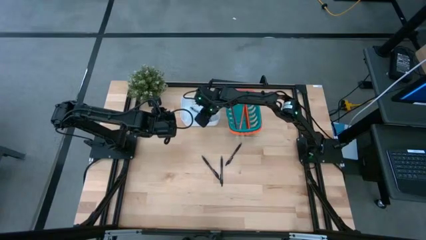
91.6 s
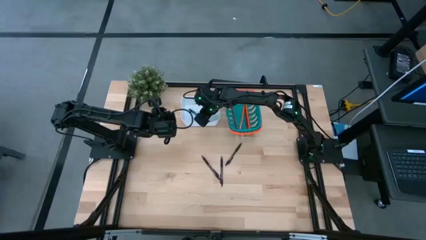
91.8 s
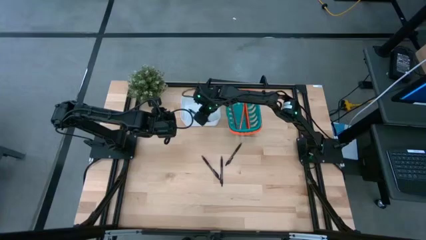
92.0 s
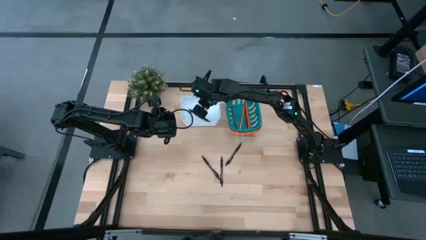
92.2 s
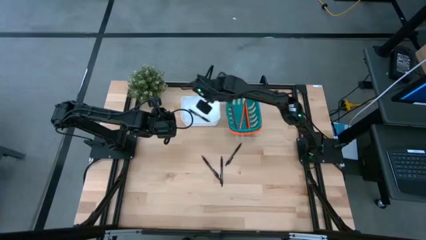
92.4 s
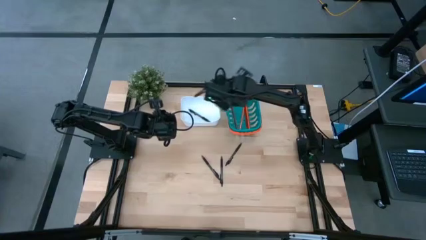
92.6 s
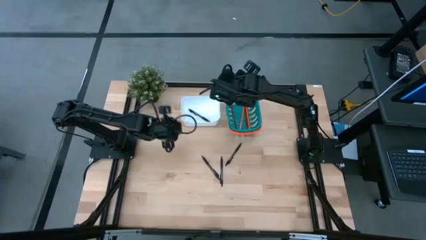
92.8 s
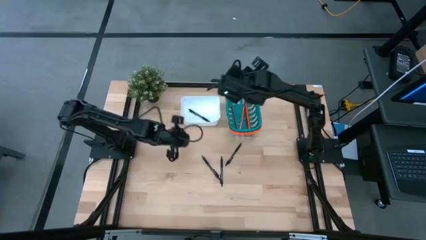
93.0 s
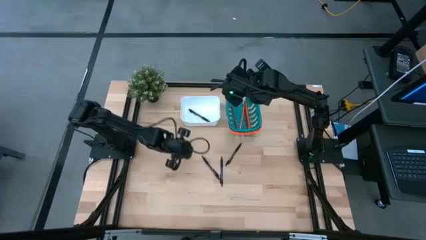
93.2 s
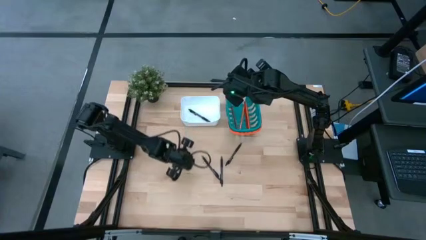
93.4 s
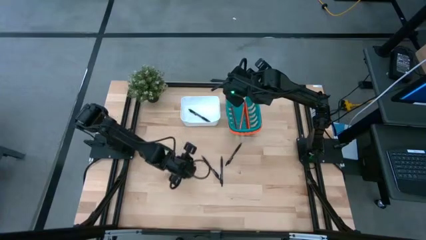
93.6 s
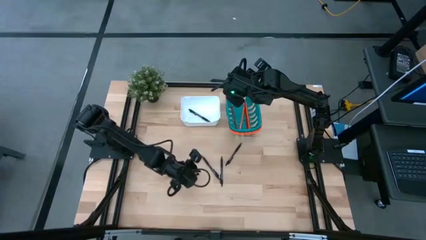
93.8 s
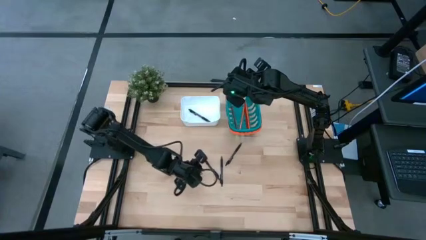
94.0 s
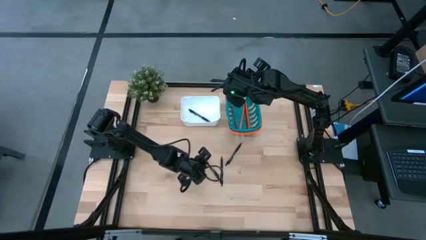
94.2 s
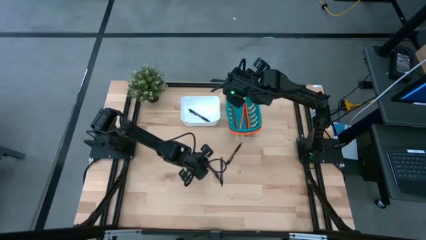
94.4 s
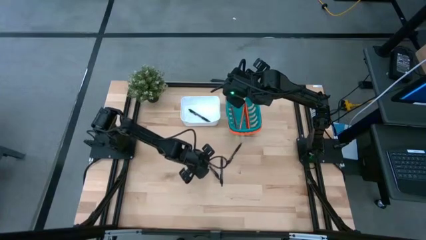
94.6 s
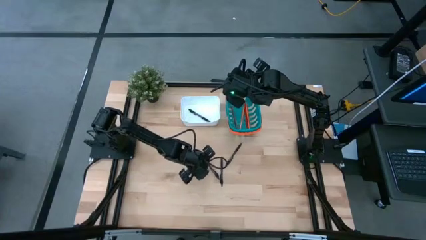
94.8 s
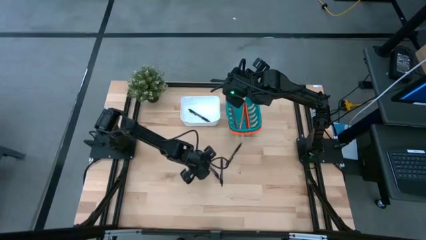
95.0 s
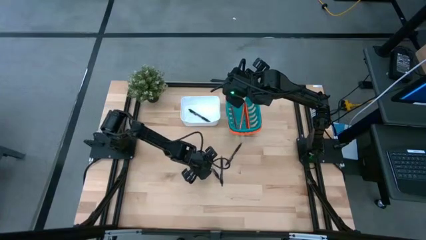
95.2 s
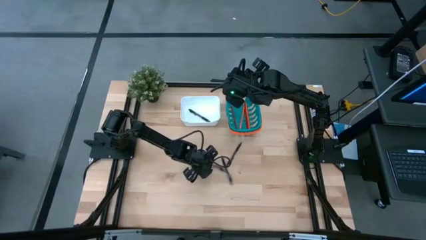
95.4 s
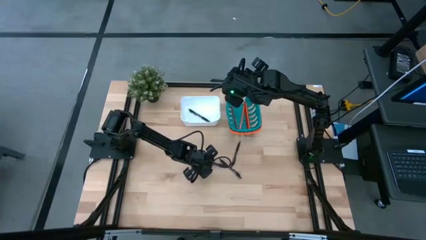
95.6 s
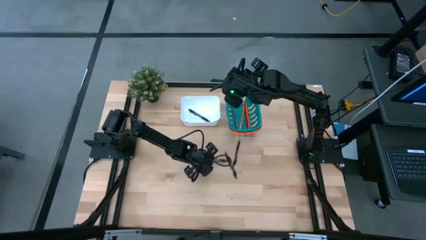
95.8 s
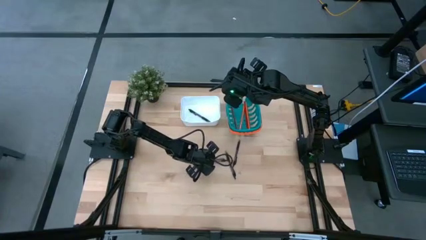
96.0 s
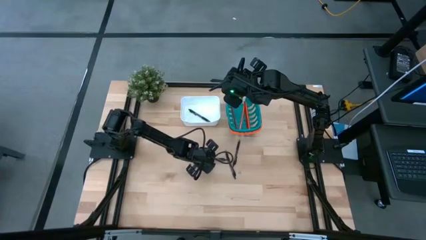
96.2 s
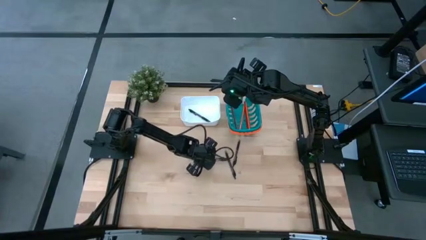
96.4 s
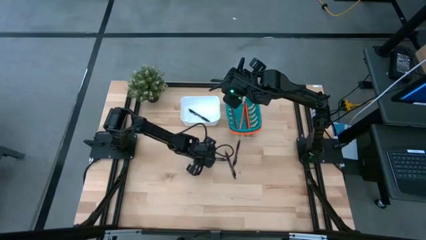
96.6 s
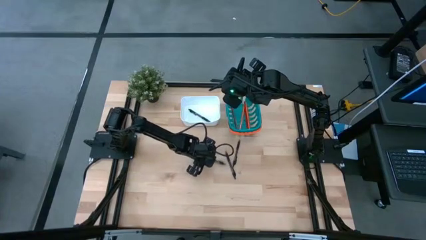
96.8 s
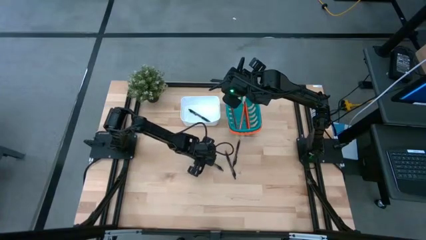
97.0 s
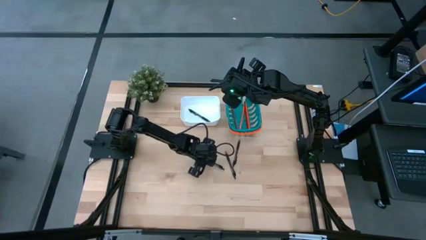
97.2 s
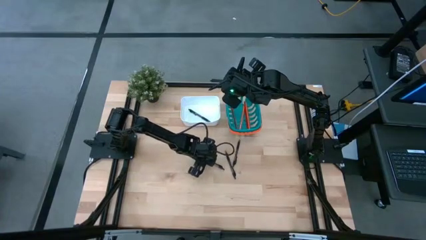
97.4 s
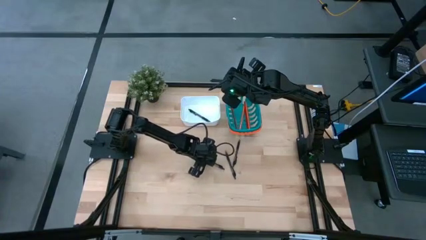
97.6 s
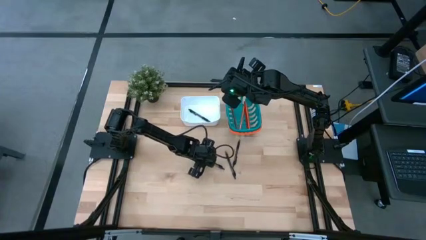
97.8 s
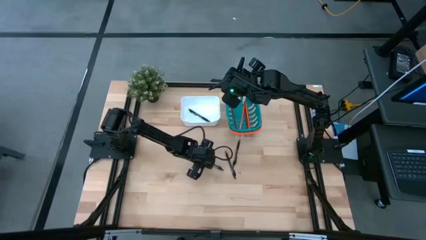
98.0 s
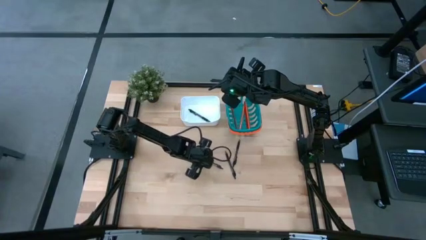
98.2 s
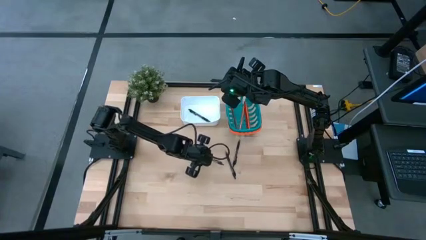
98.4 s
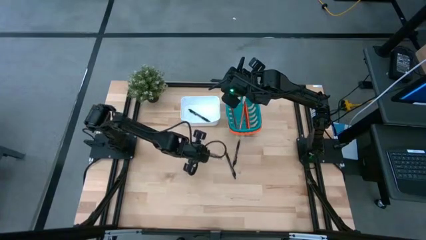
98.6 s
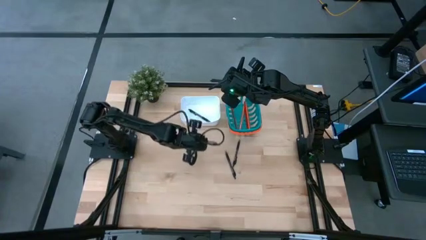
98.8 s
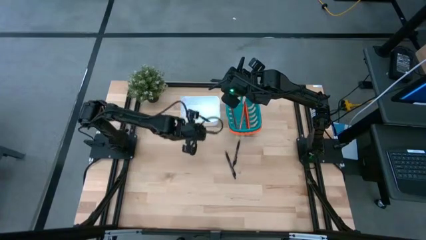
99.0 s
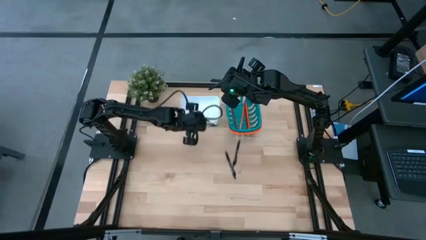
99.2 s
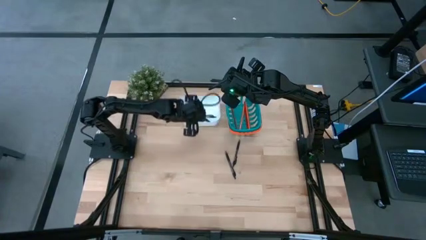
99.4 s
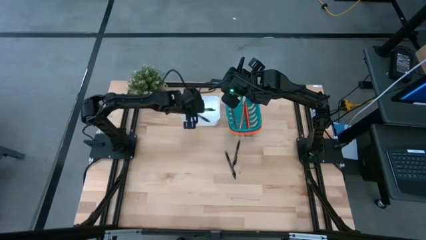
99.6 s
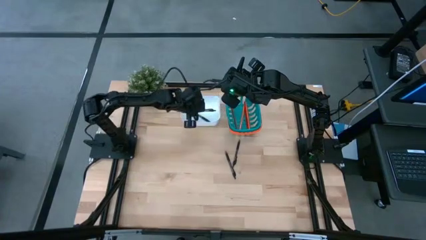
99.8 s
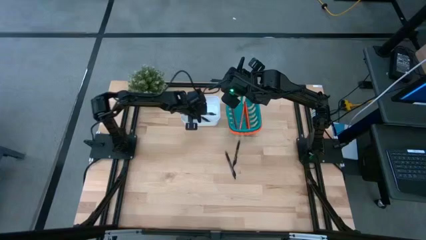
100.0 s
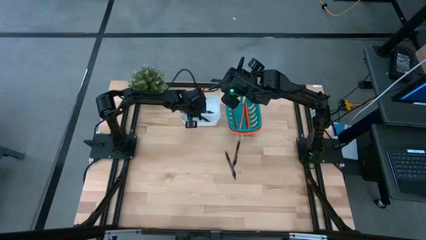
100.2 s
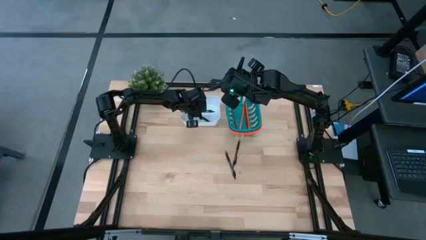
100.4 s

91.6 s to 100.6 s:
Task: Sort pens & pencils
Put the left black ballpen into the white bin

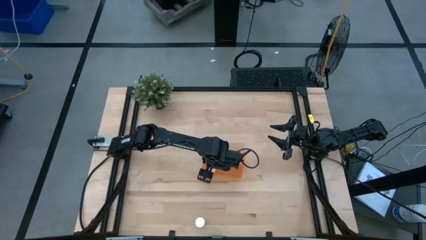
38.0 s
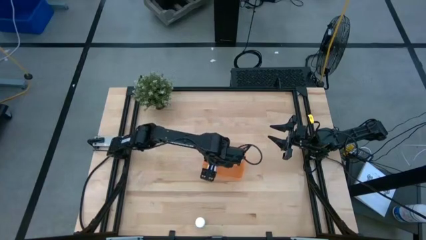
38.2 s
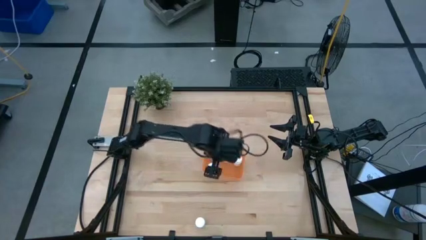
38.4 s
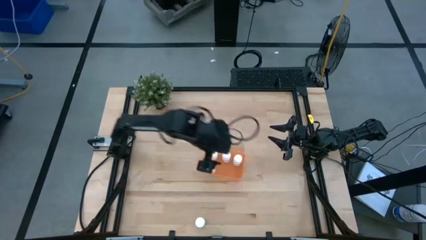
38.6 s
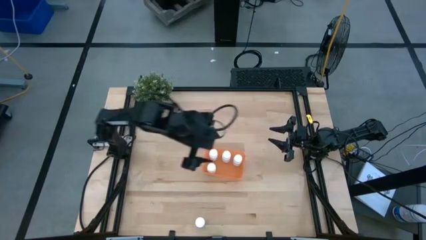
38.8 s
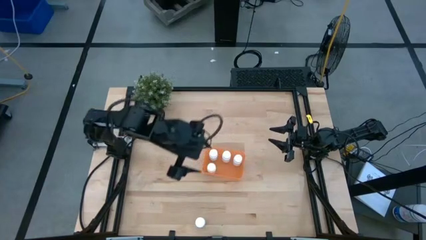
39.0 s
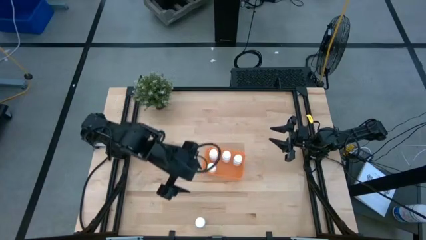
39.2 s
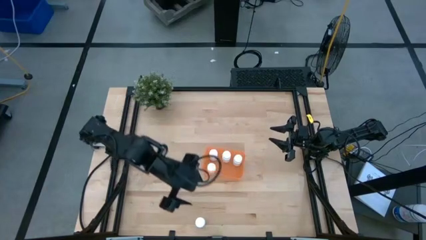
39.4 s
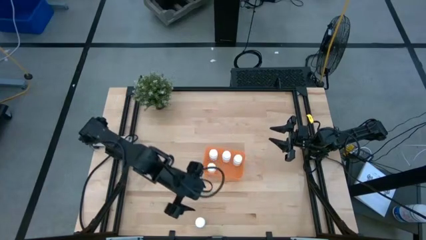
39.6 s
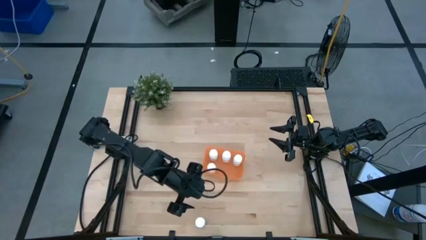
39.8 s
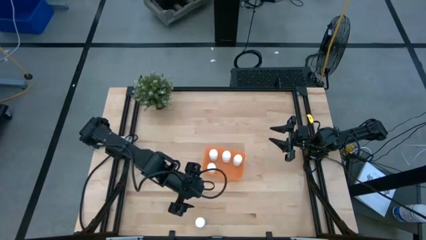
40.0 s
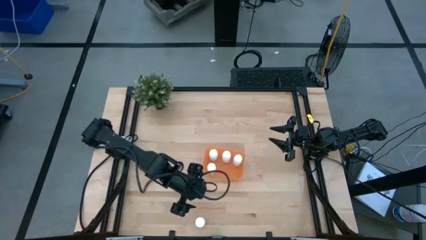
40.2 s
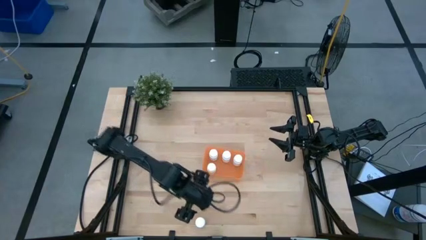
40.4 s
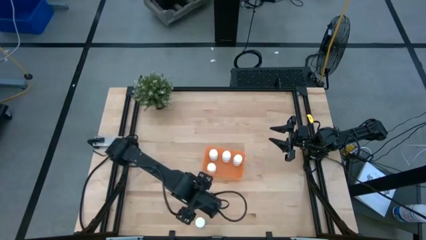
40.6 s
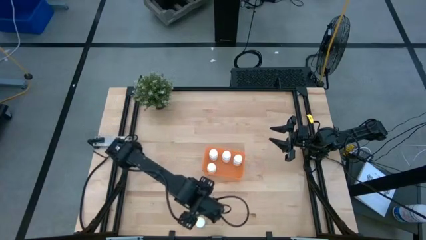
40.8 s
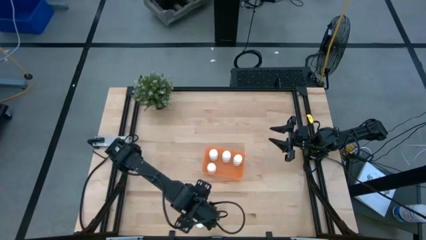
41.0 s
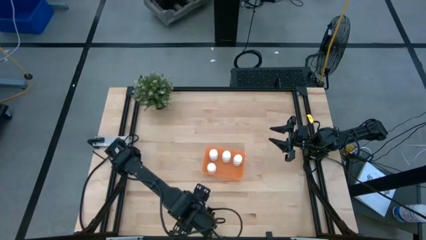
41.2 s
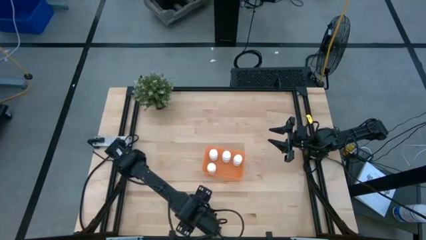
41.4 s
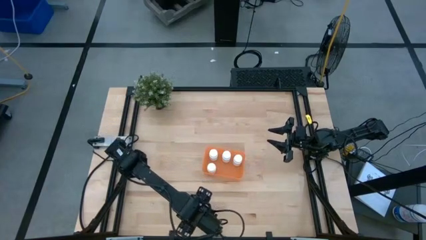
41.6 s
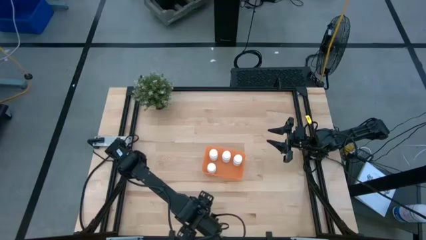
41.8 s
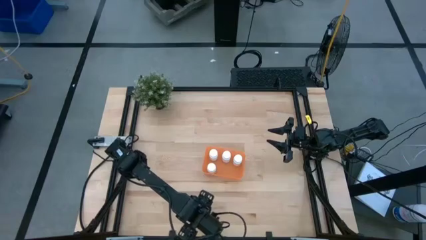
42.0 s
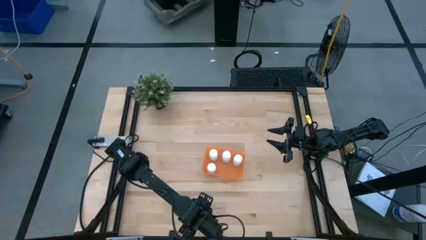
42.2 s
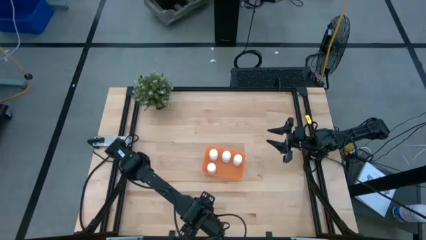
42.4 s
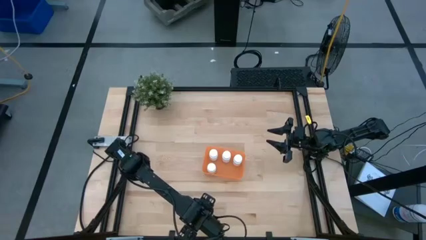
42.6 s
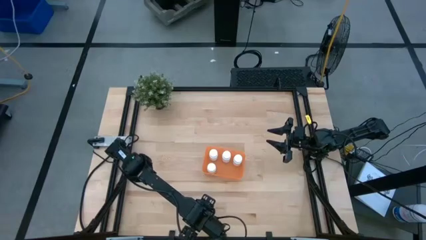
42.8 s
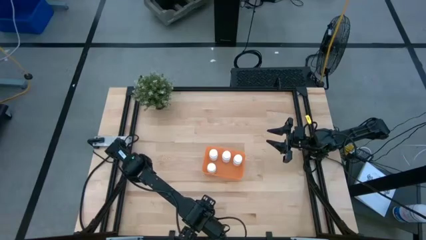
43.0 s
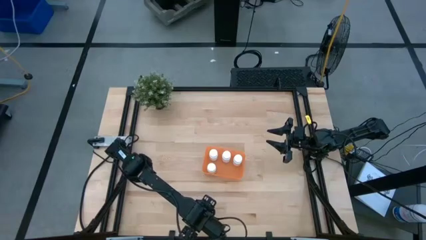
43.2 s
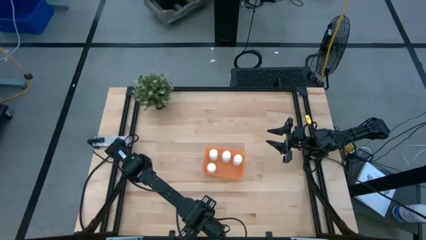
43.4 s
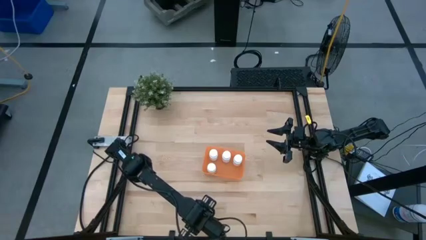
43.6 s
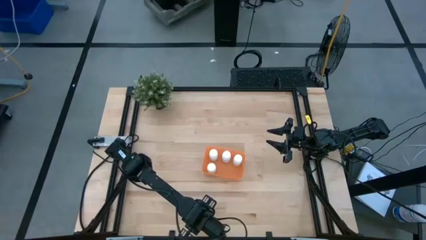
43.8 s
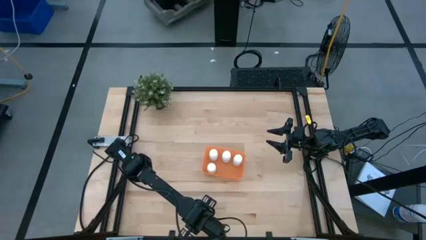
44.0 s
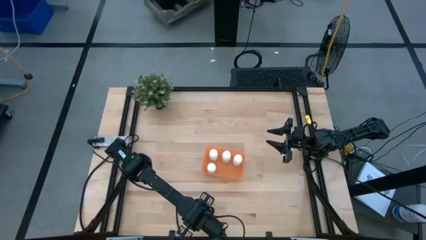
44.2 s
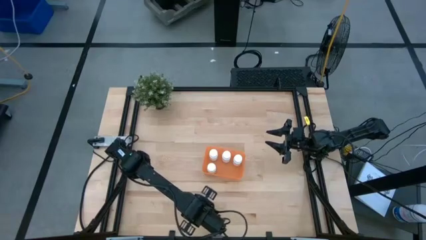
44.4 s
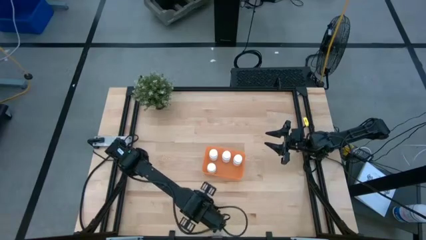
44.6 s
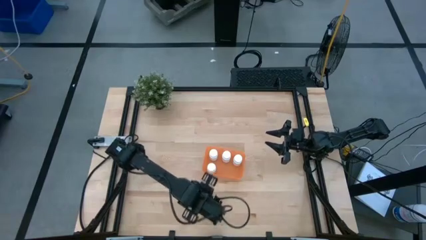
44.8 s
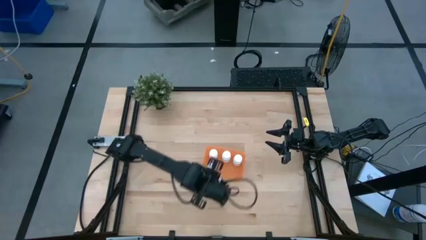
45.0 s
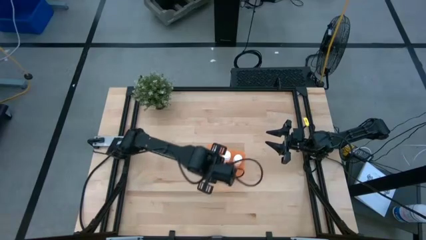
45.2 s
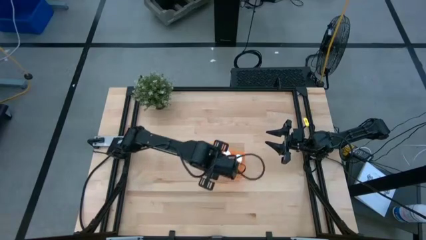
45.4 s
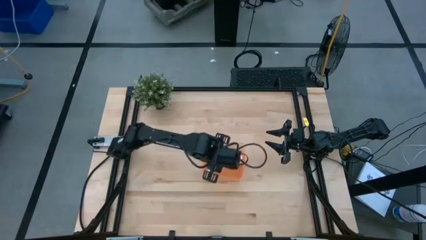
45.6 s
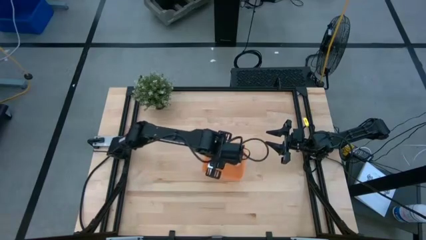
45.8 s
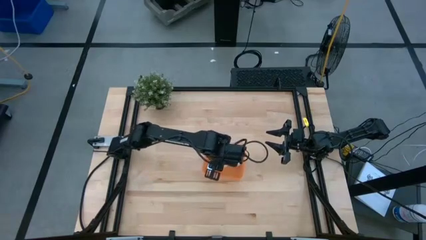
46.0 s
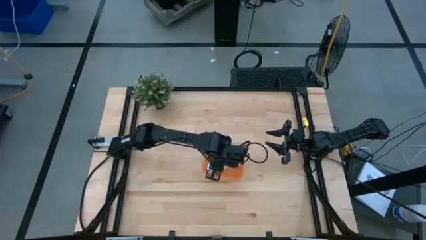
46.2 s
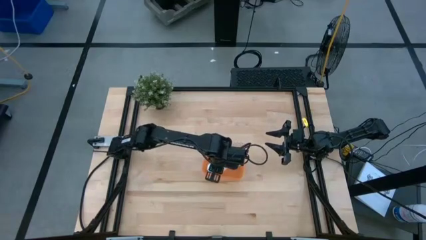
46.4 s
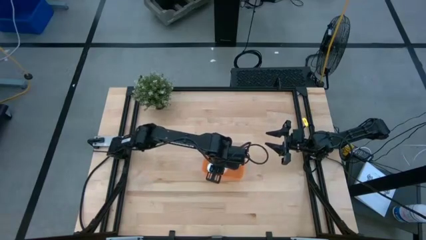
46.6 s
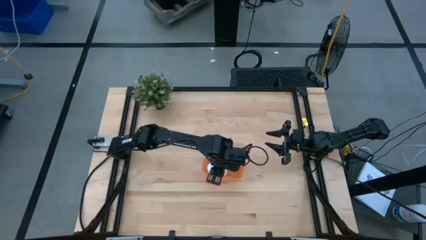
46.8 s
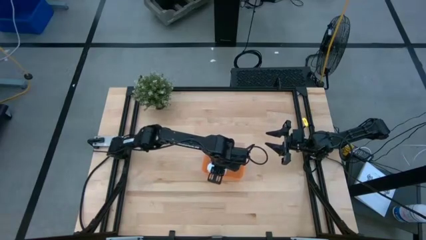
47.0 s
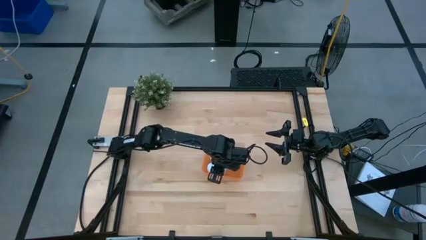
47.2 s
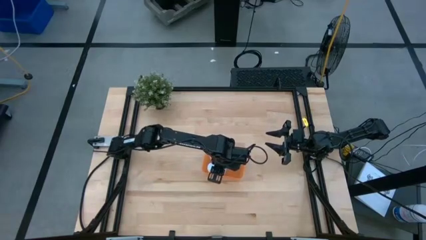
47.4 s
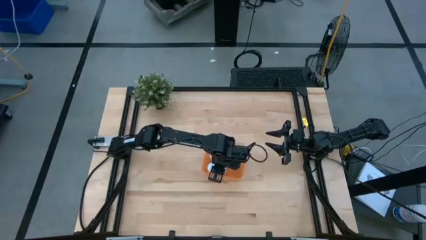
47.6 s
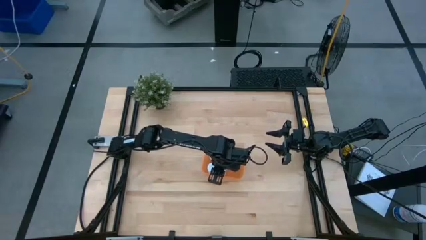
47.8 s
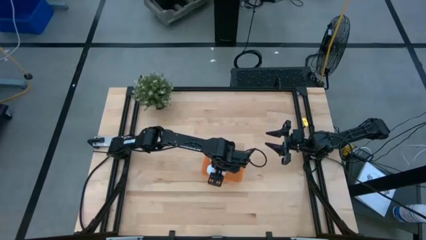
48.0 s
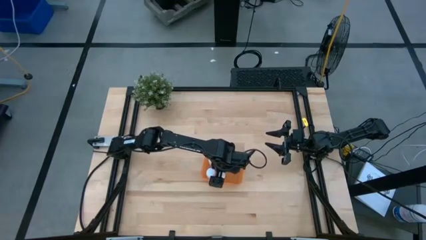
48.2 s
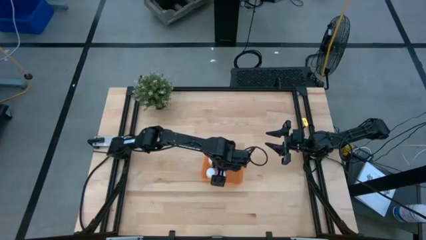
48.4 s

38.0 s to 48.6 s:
Task: Pick and place pill bottles into a basket
Put the pill bottle into the bin
